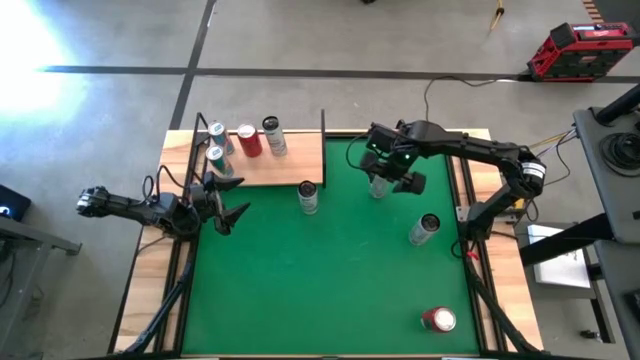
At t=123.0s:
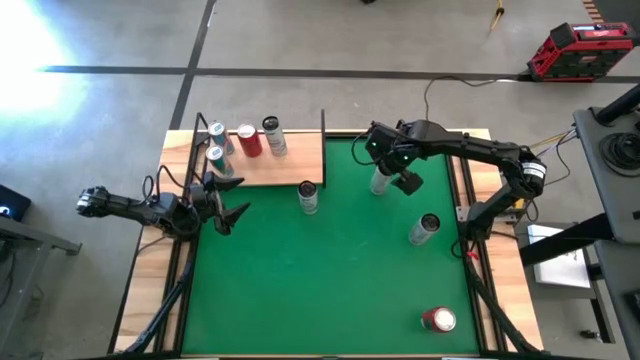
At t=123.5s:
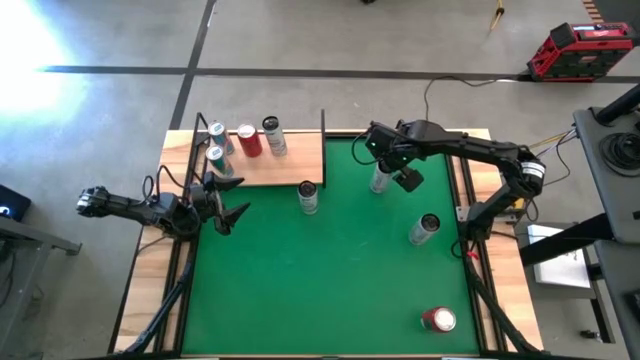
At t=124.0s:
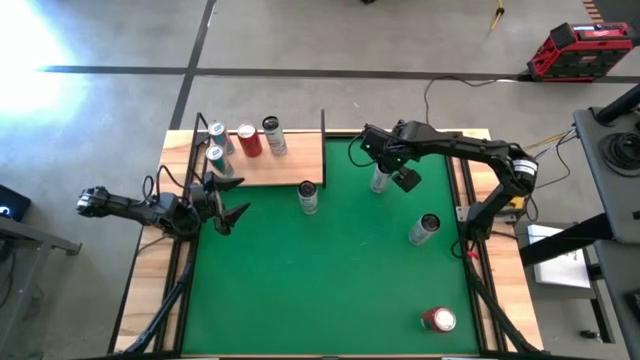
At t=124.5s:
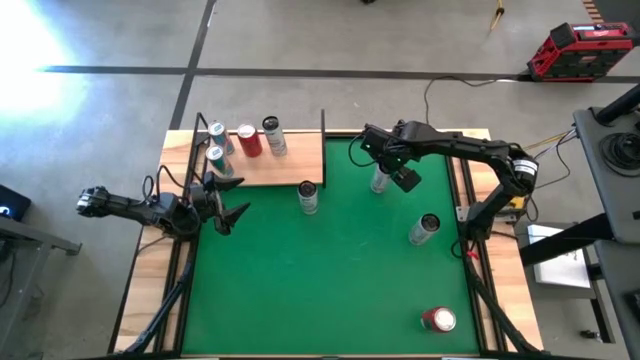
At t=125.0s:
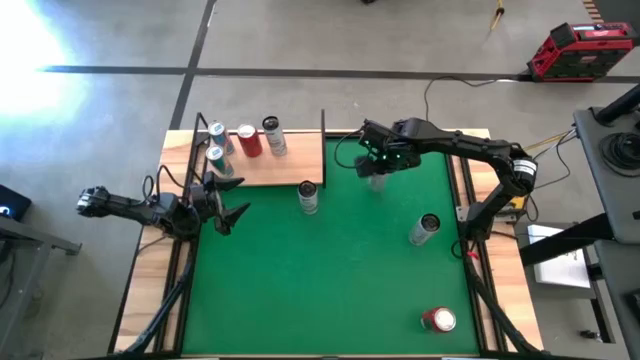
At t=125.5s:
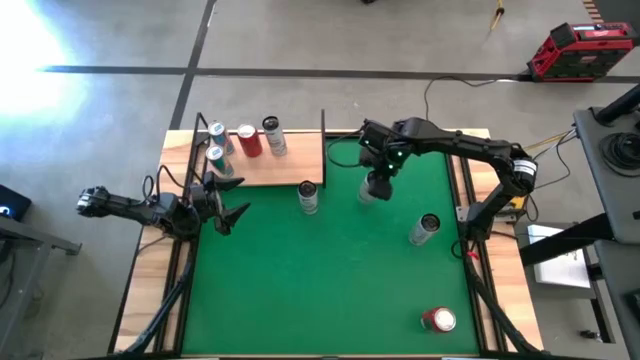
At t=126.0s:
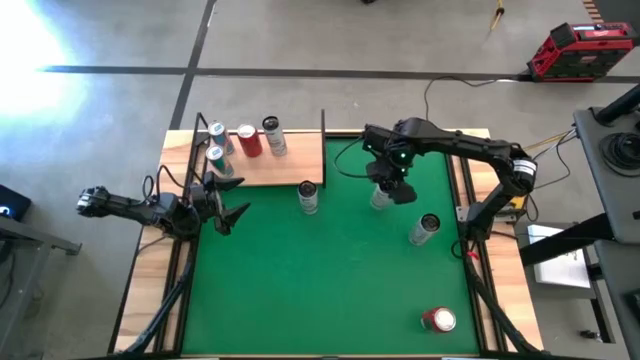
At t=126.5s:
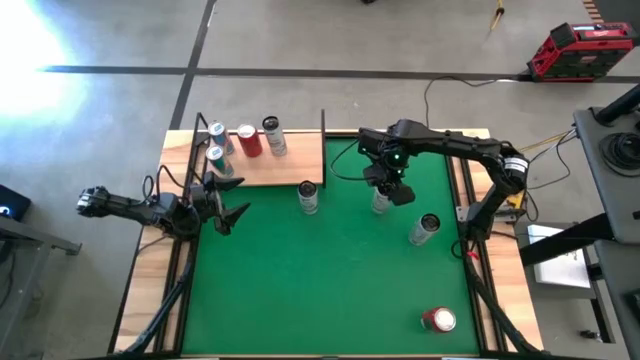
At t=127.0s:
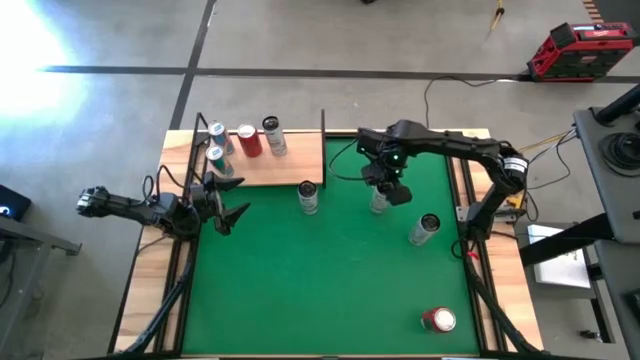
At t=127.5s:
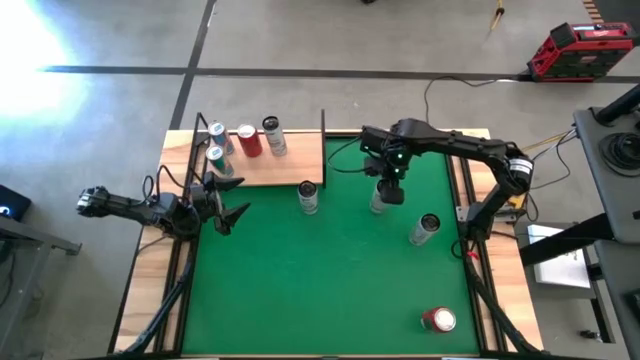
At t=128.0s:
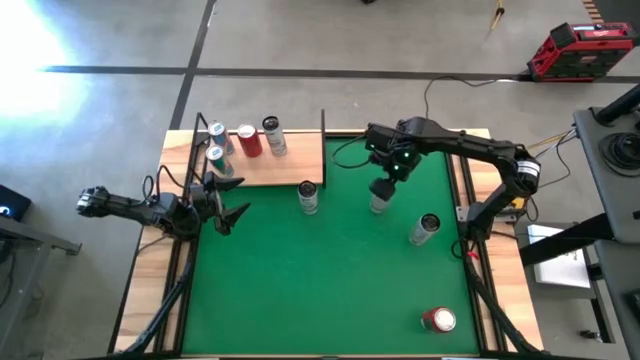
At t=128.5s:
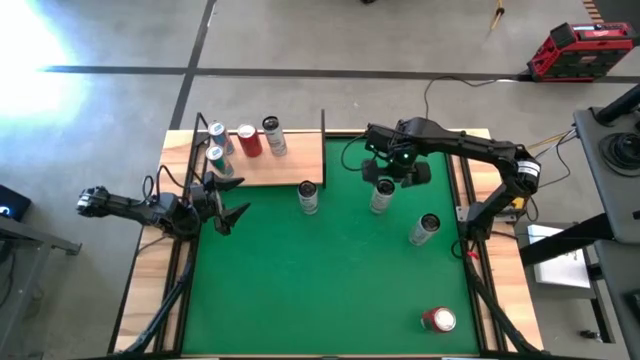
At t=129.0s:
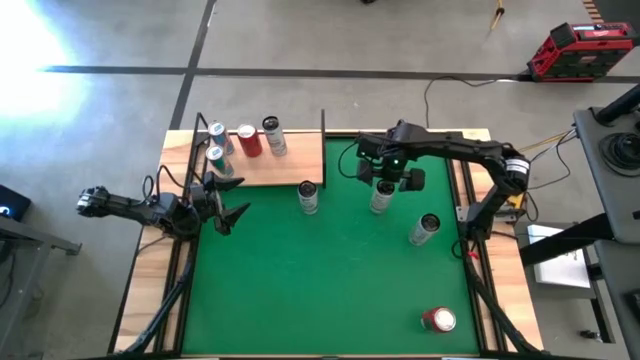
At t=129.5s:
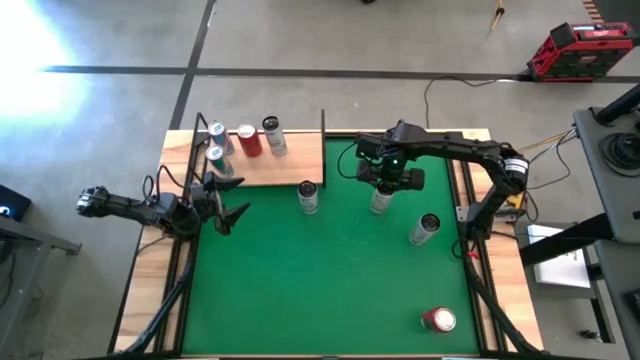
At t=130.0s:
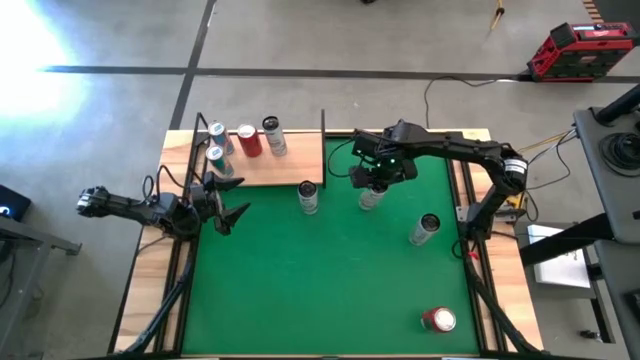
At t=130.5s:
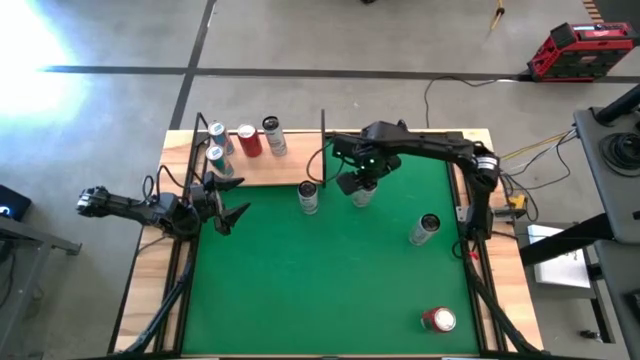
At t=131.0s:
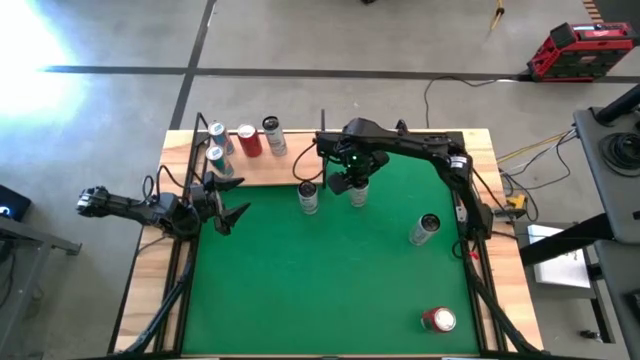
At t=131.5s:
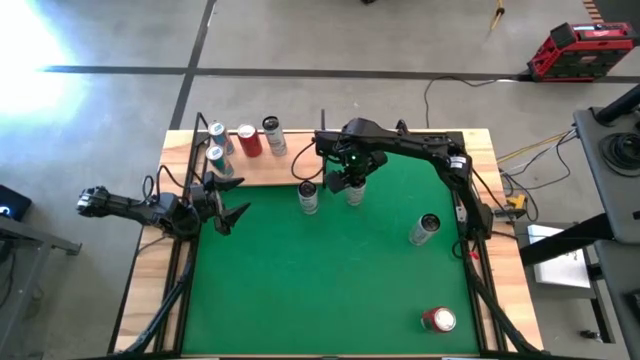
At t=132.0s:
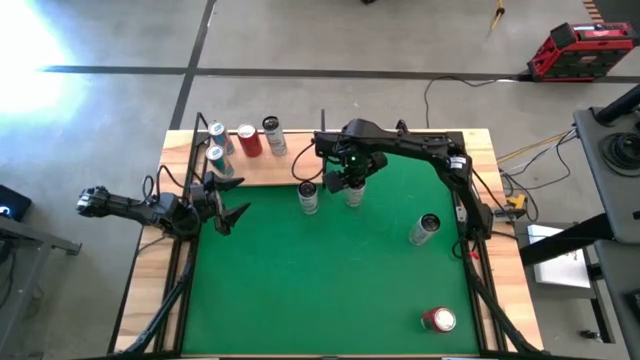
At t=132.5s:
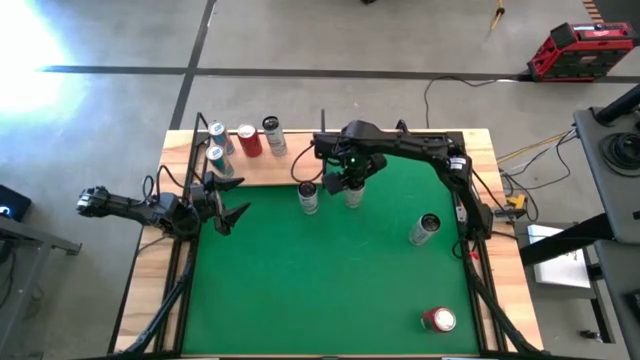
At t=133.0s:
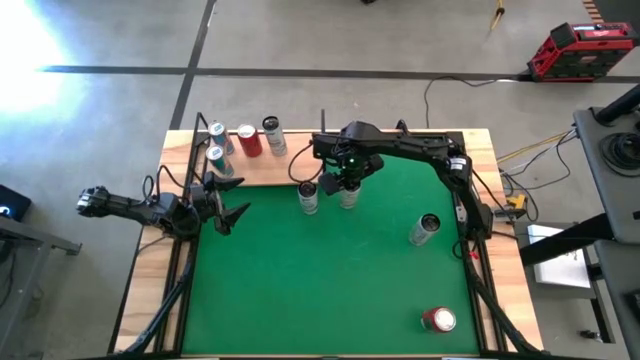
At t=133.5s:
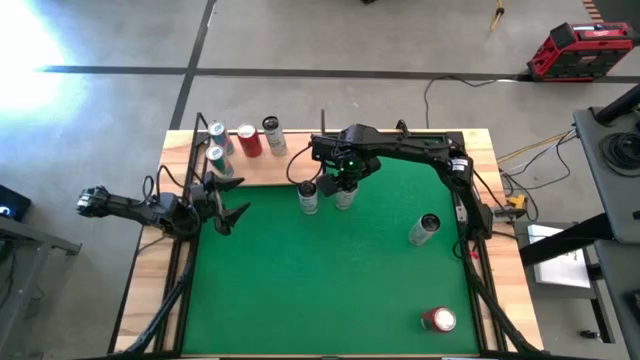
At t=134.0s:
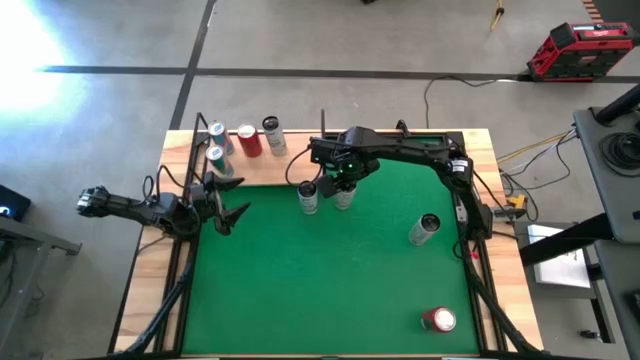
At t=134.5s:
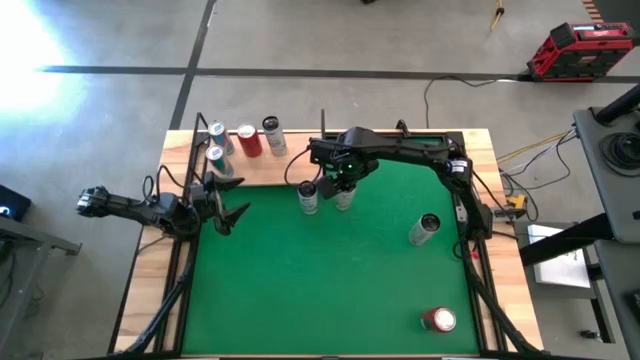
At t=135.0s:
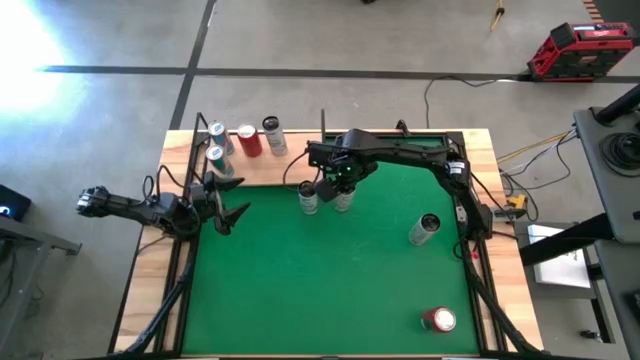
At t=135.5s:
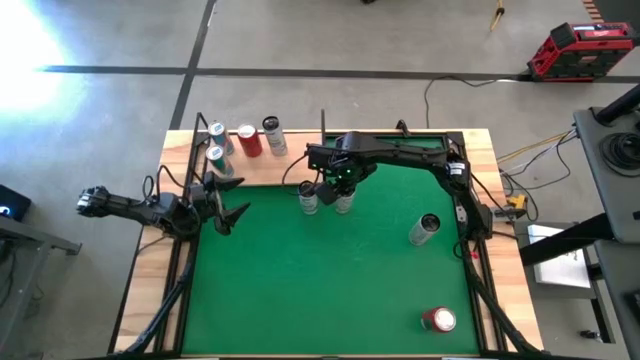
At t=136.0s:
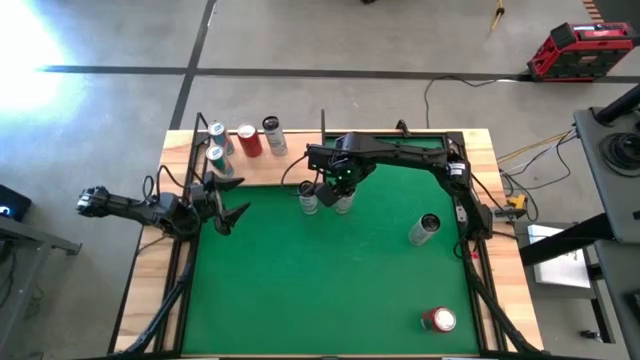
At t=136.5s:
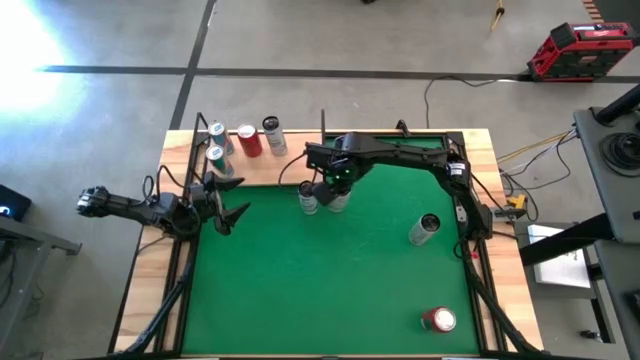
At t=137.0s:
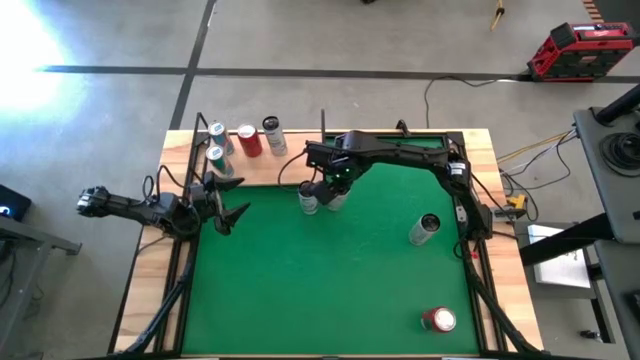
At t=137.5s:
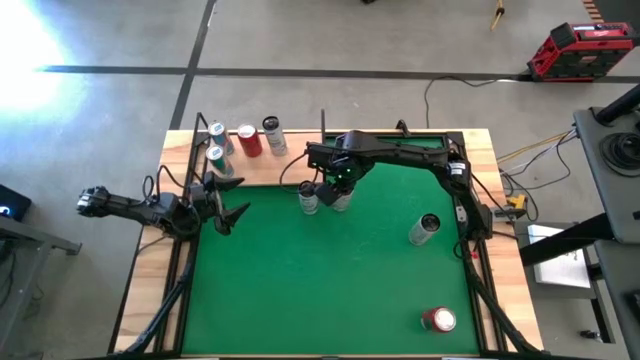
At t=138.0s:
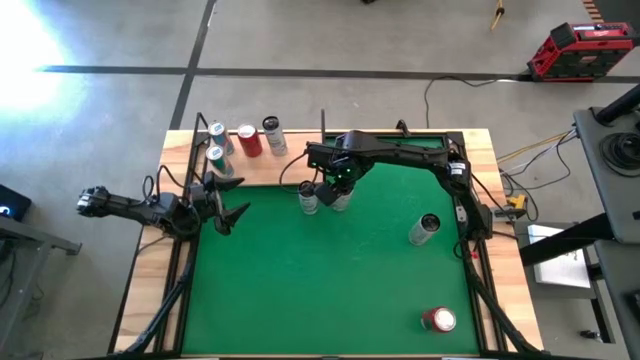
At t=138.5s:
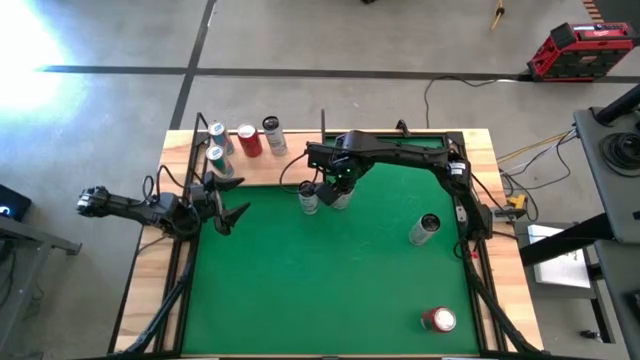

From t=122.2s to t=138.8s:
Task: Place canned beverage on shelf
Move the white yellow soda can to the top center of the table

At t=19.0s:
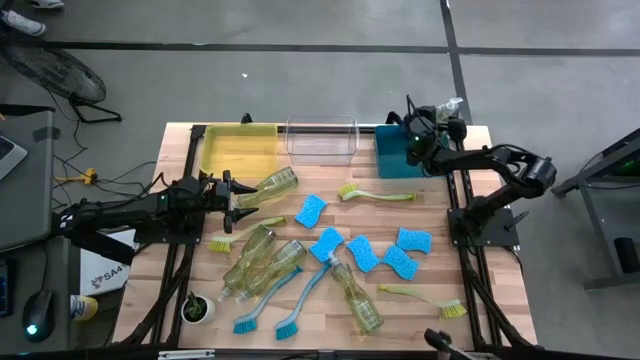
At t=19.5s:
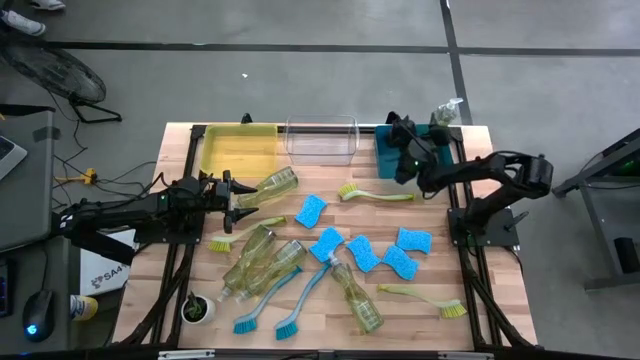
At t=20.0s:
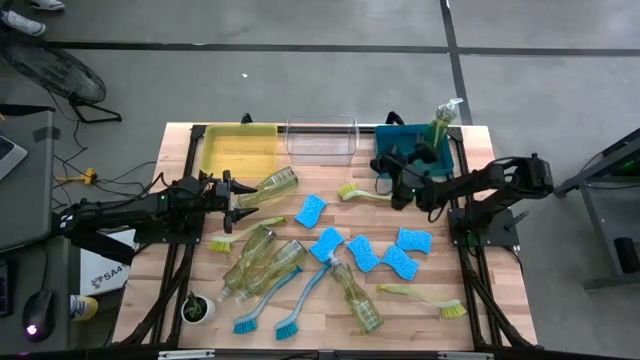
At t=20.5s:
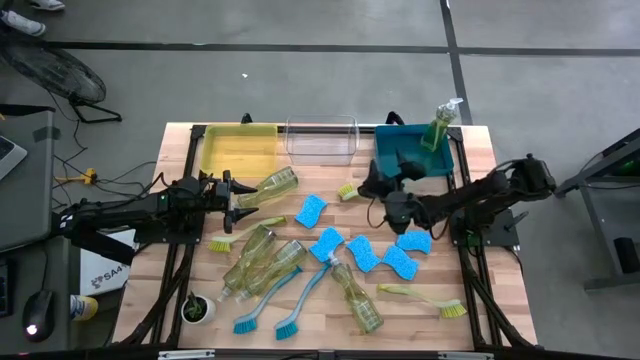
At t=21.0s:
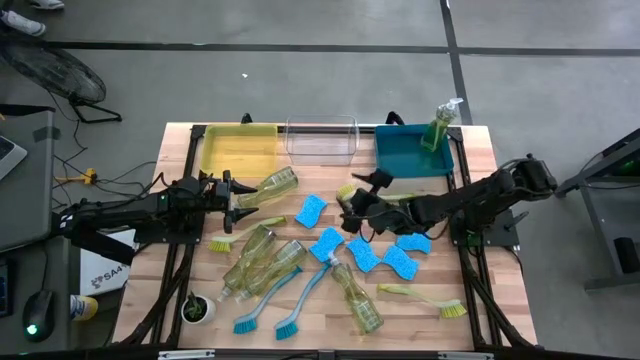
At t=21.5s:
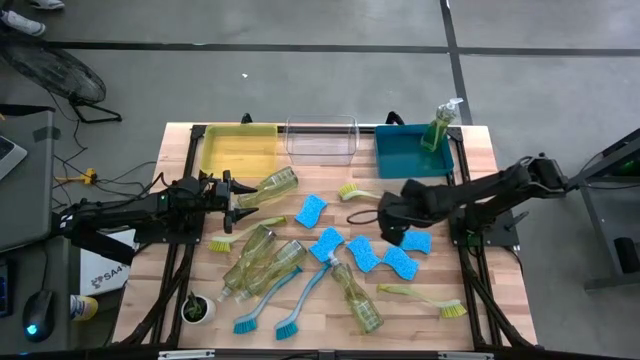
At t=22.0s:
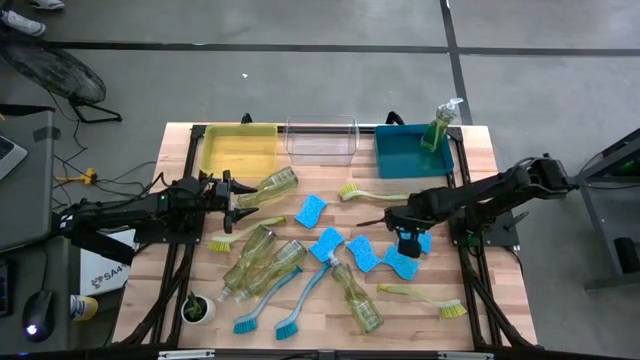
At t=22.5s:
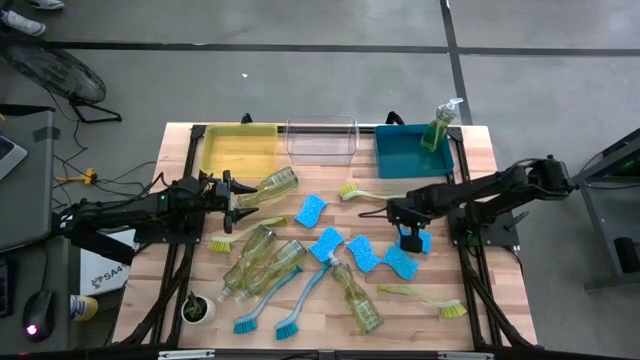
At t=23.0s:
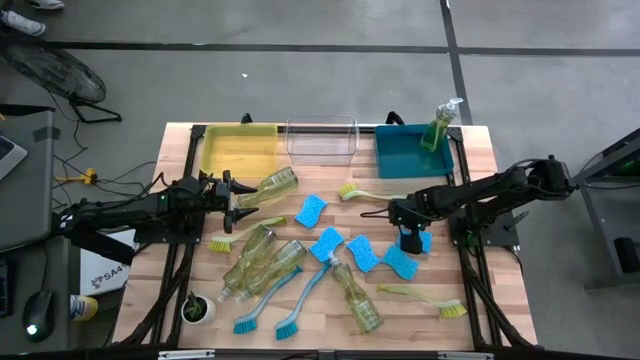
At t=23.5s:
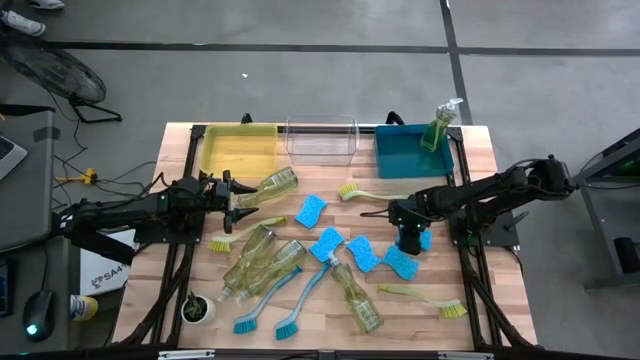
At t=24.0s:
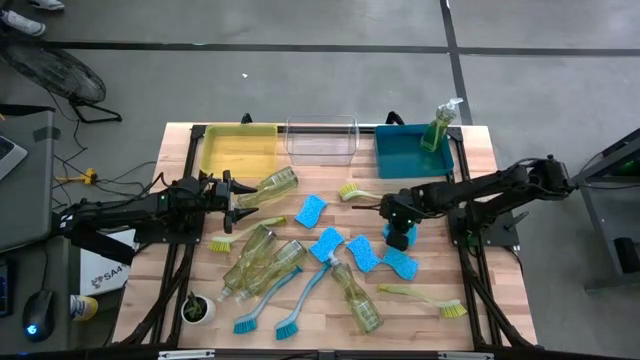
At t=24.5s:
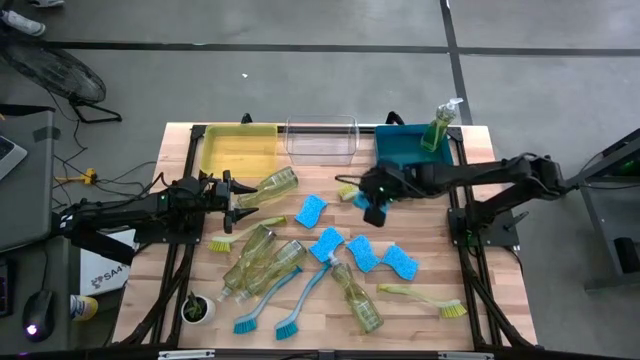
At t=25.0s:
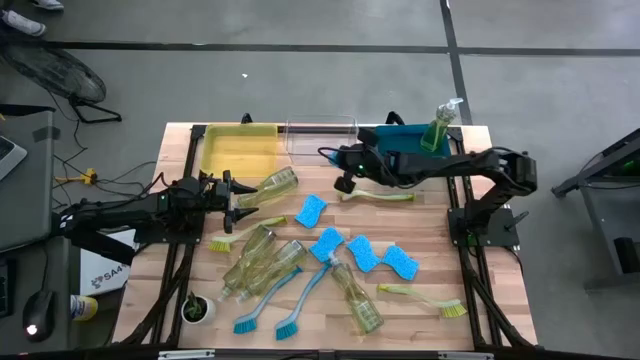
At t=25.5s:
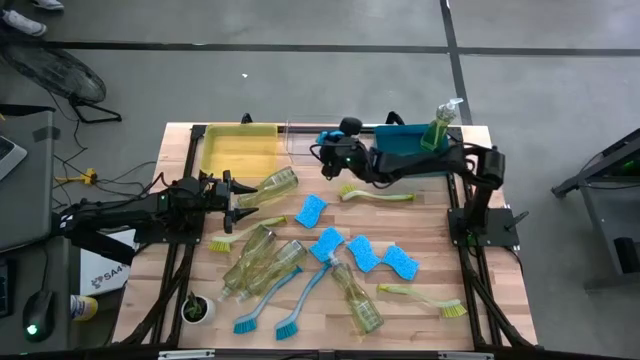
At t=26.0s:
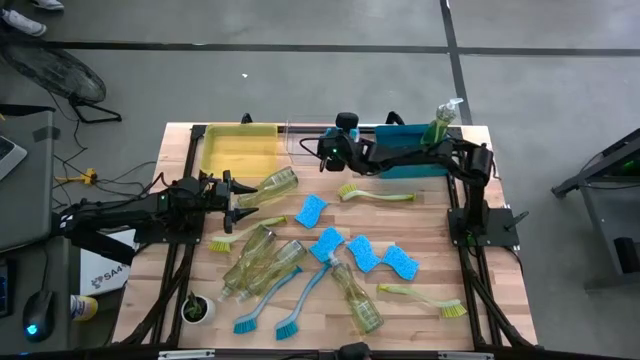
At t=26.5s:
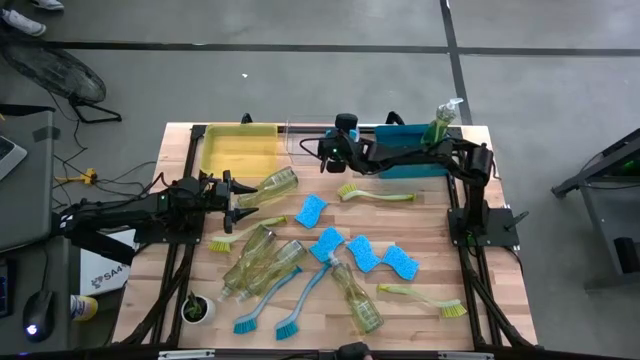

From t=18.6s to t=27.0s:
Task: Pick & Place Kitchen Sink Supplies
Put the sponge into the transparent bin
